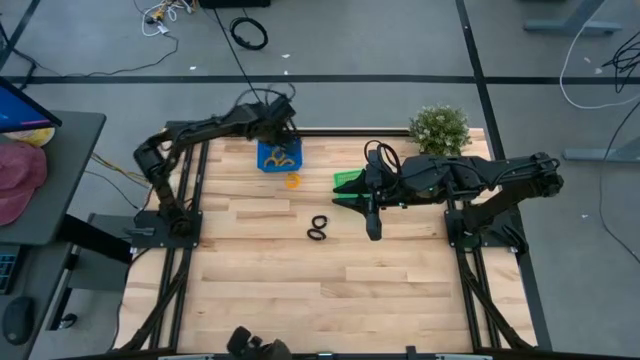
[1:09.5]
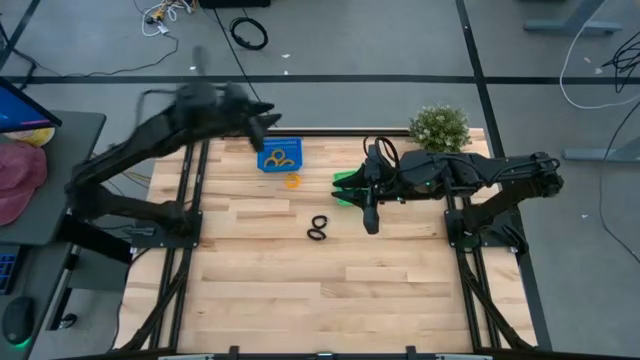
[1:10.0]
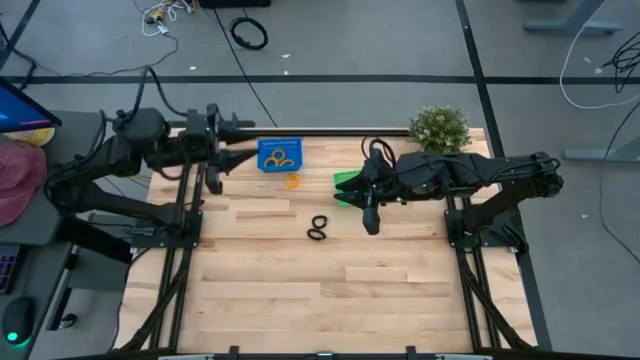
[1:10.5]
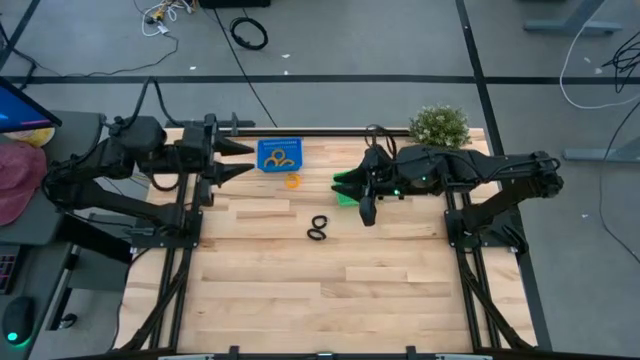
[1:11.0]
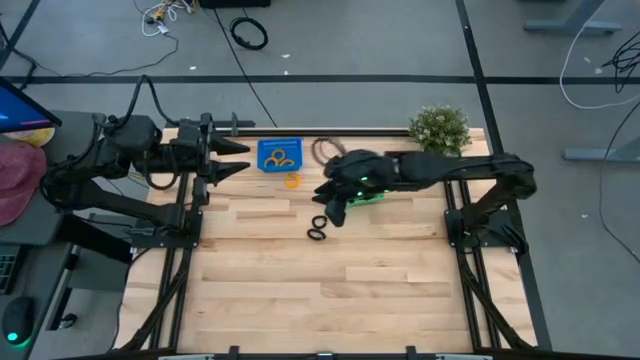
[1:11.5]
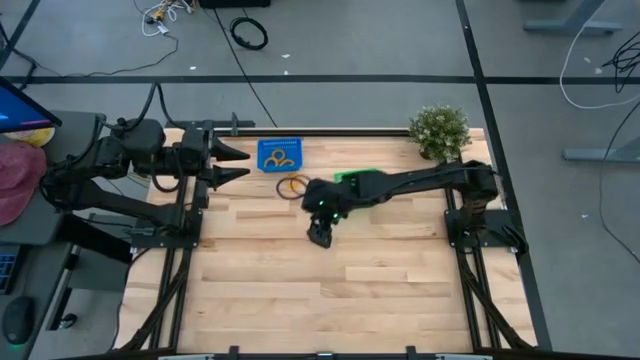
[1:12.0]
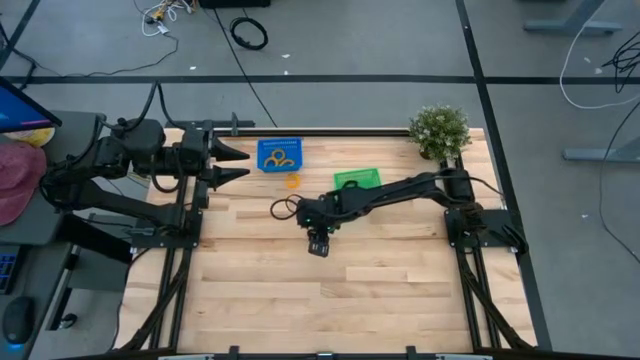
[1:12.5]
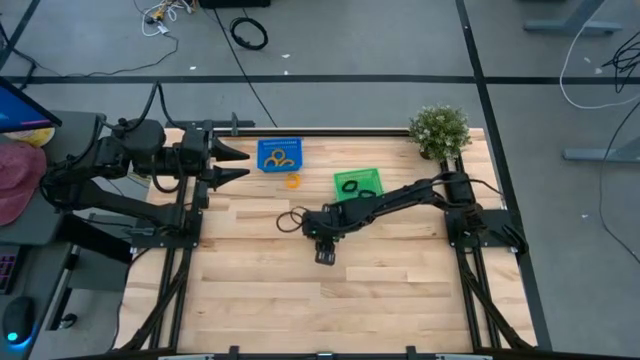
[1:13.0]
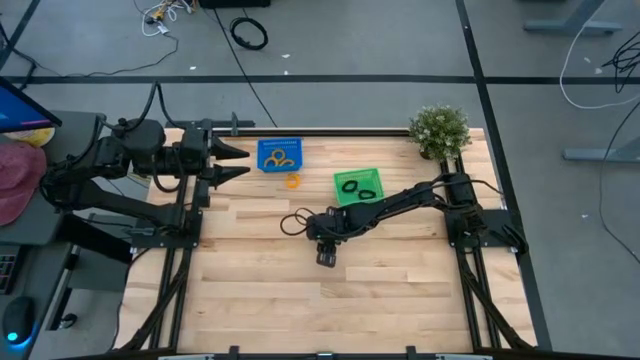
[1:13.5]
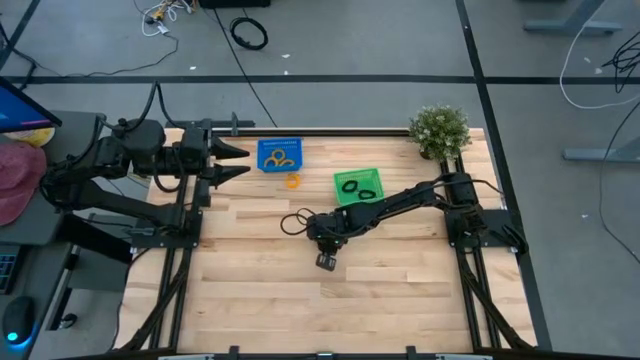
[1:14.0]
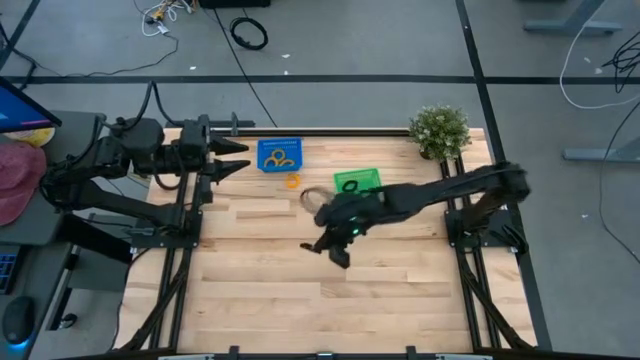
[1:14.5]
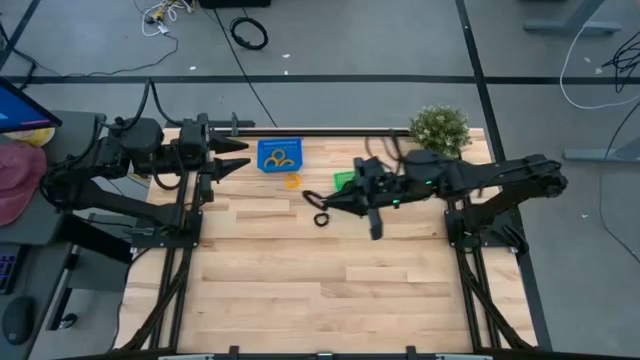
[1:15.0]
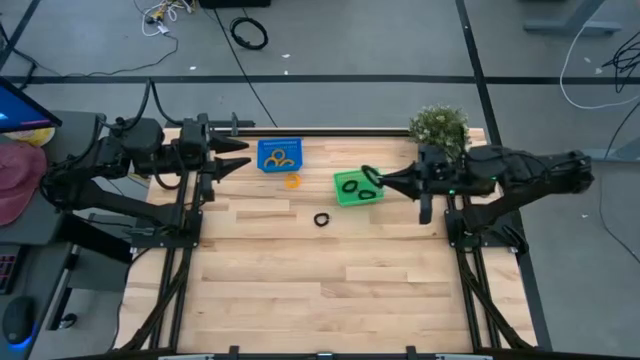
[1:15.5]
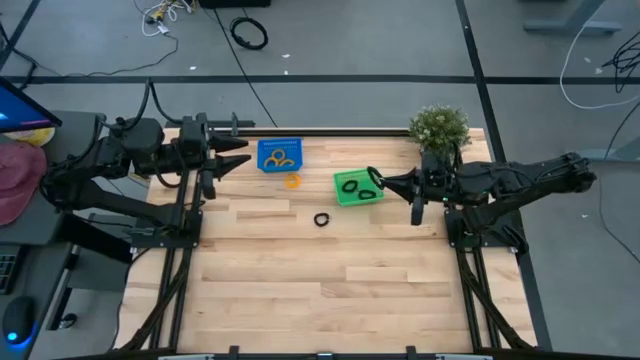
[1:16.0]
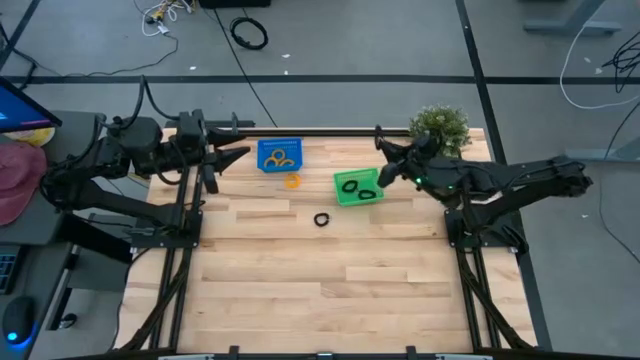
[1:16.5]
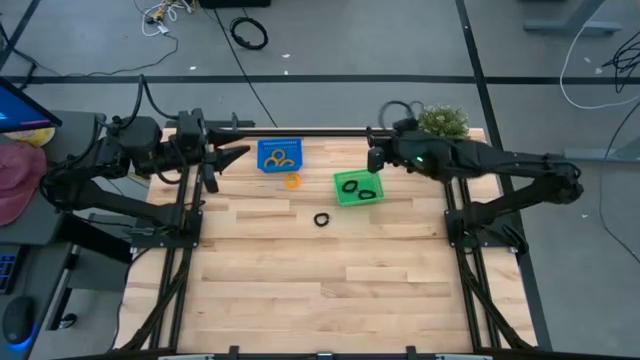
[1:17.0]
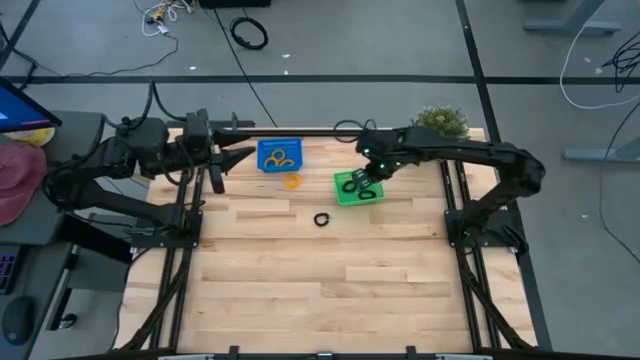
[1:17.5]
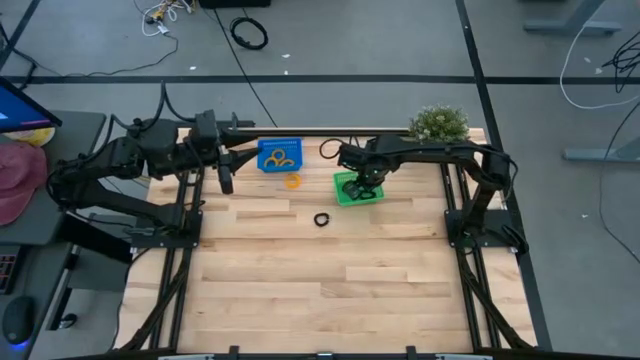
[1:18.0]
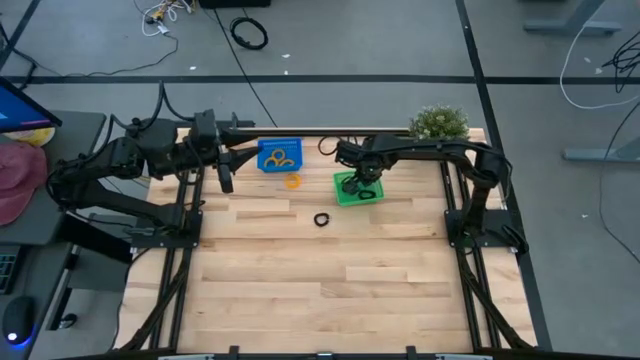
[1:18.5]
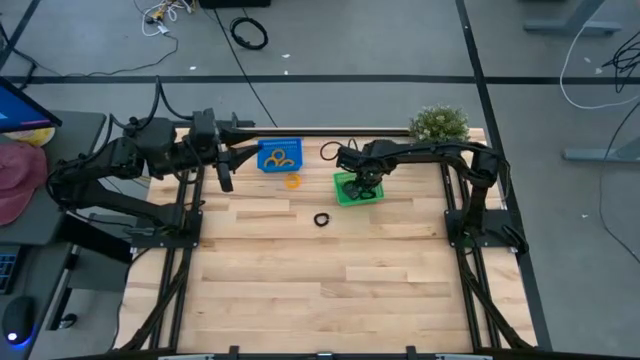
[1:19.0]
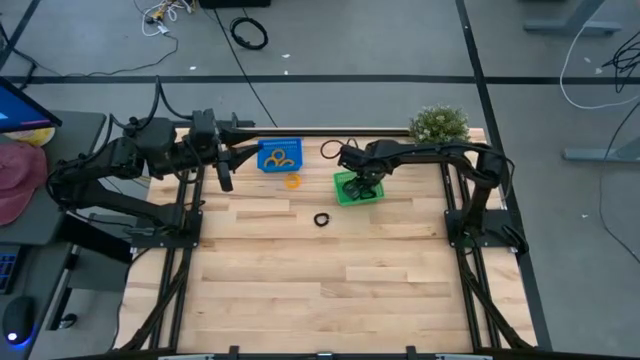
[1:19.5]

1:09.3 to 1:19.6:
Task: Sort spring keychains
Put the black spring keychain into the green bin

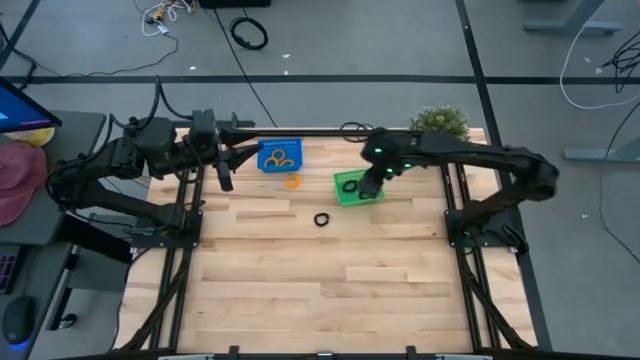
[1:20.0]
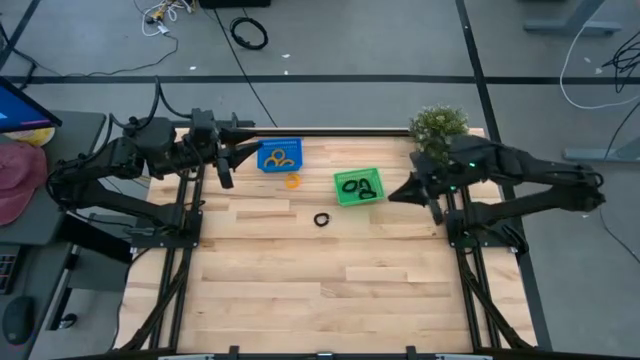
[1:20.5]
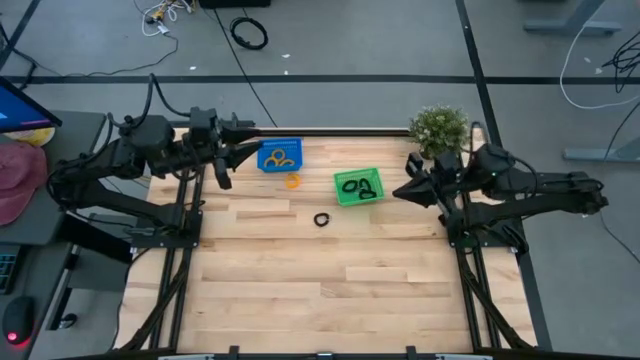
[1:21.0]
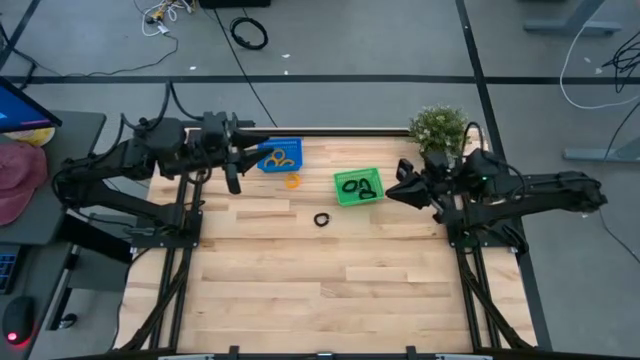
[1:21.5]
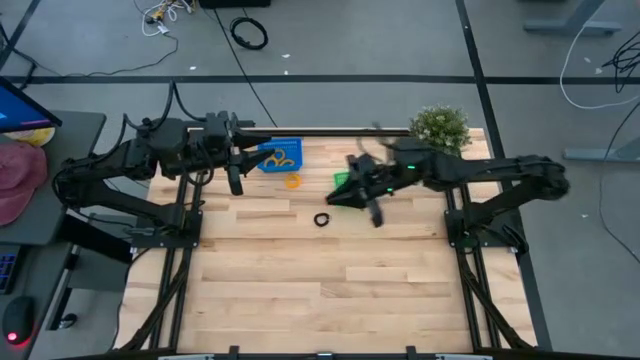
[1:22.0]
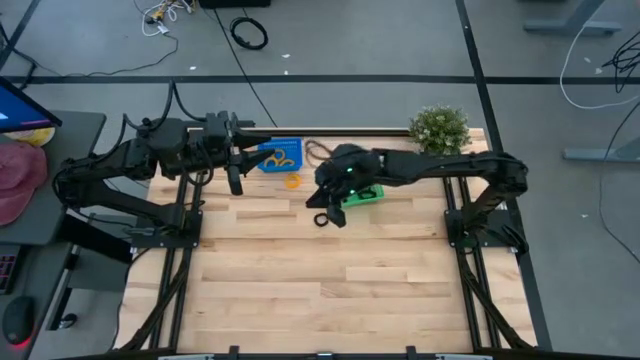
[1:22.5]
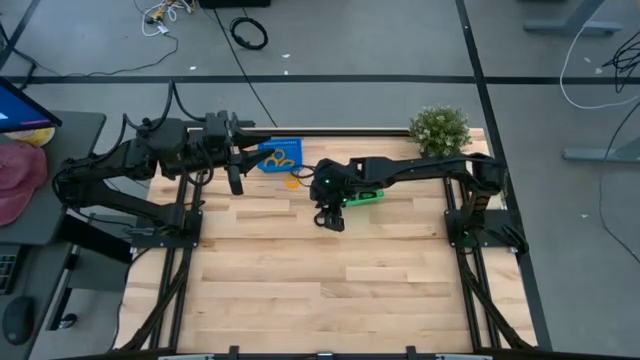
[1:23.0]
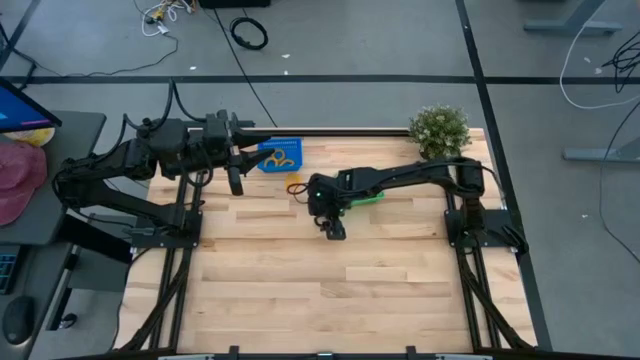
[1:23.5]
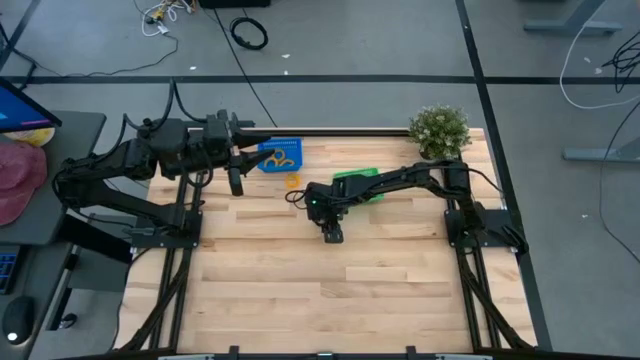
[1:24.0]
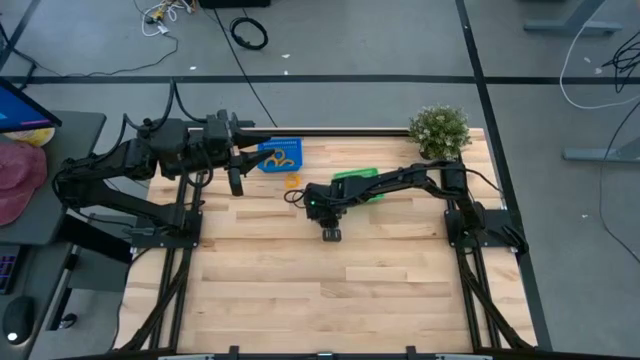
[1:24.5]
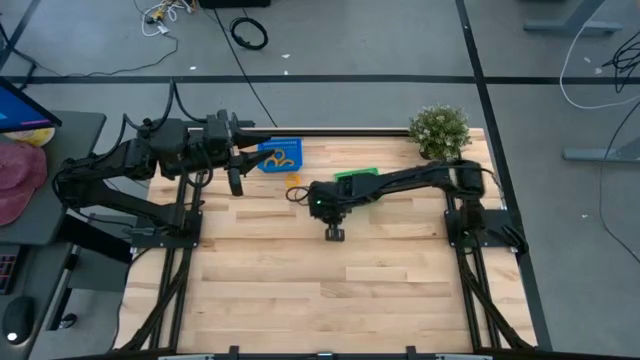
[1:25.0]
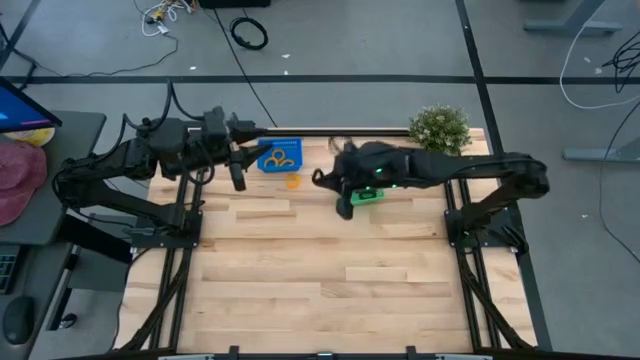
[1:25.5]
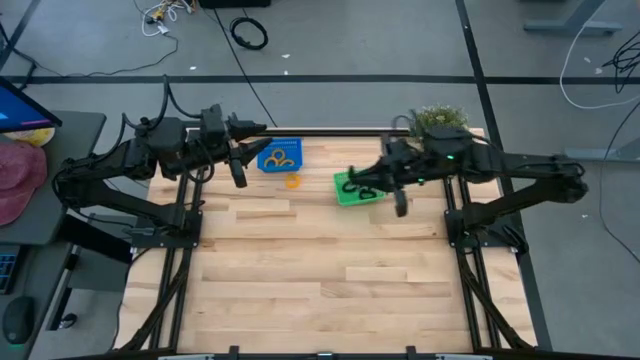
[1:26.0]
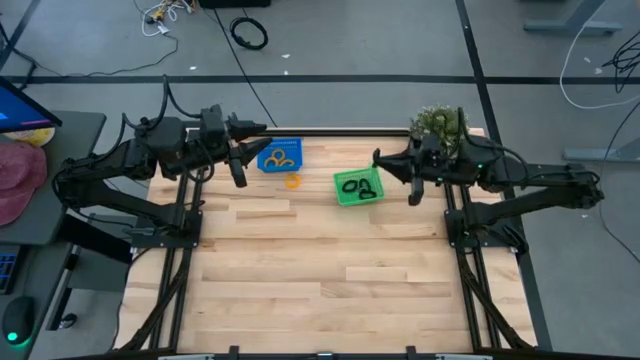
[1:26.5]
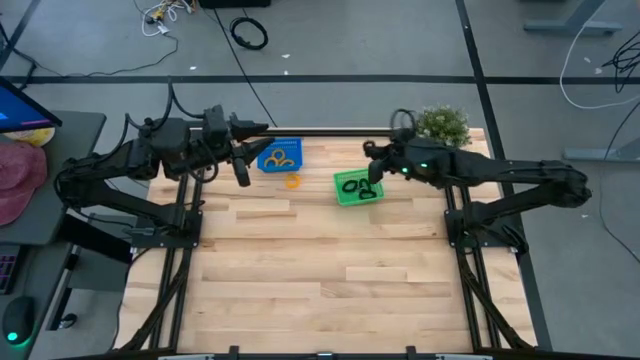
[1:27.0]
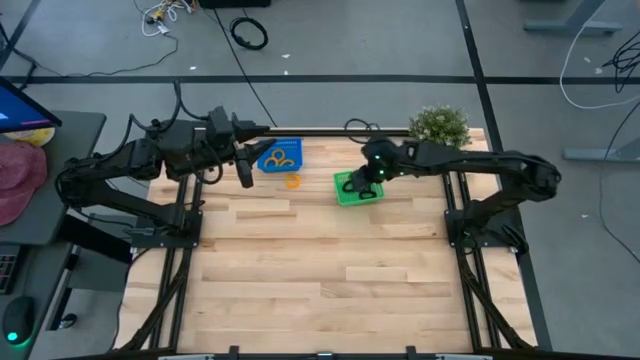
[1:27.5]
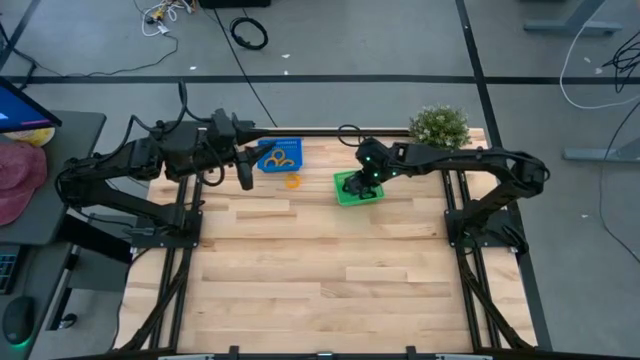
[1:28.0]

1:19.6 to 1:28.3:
Put the black spring keychain into the green bin

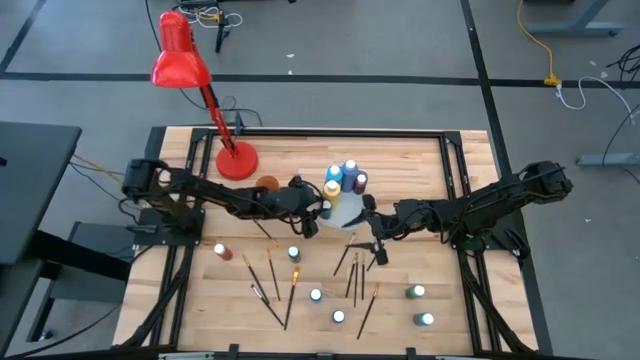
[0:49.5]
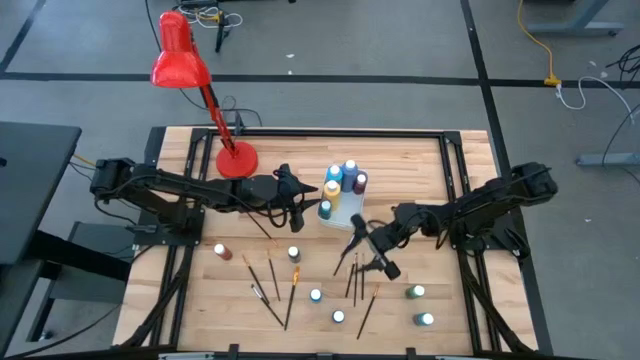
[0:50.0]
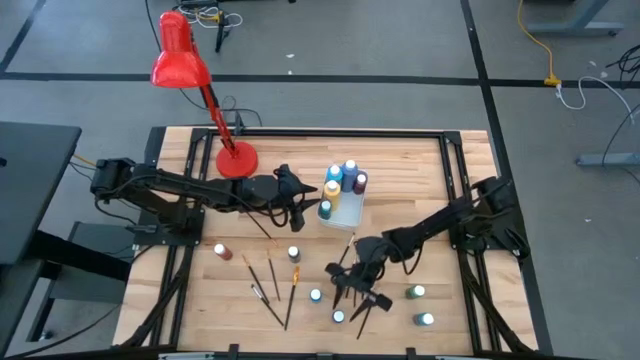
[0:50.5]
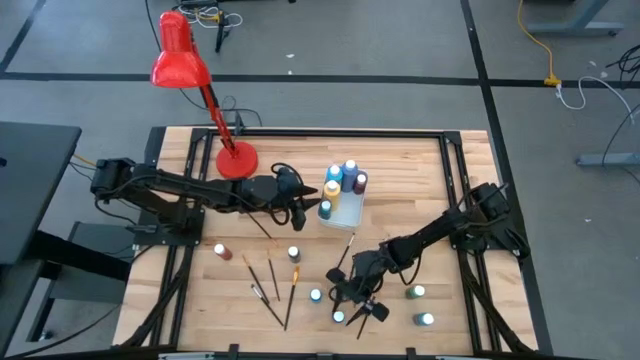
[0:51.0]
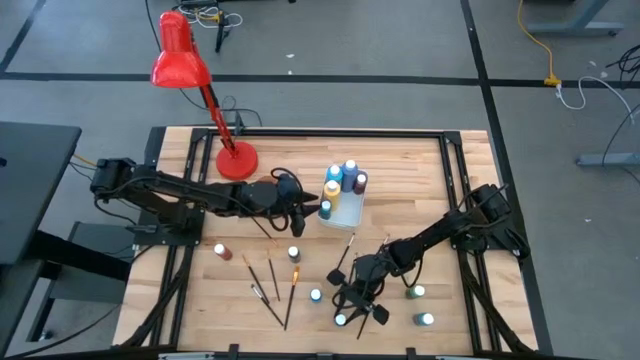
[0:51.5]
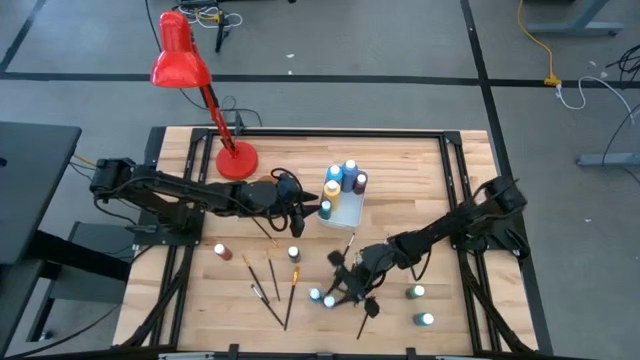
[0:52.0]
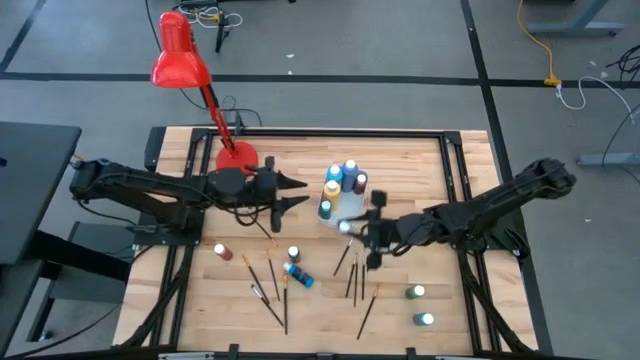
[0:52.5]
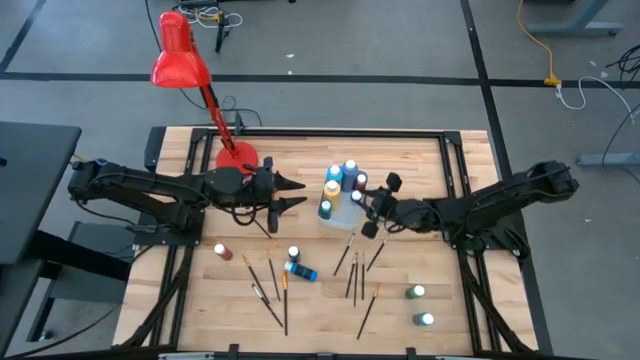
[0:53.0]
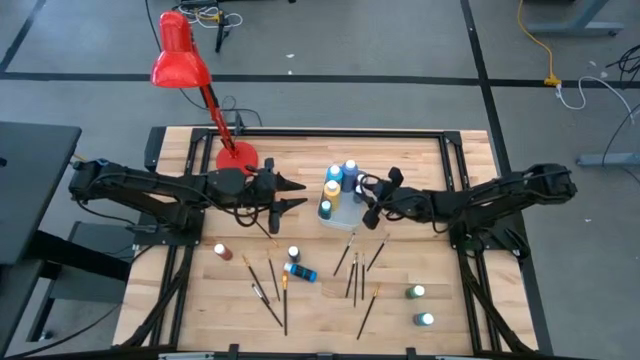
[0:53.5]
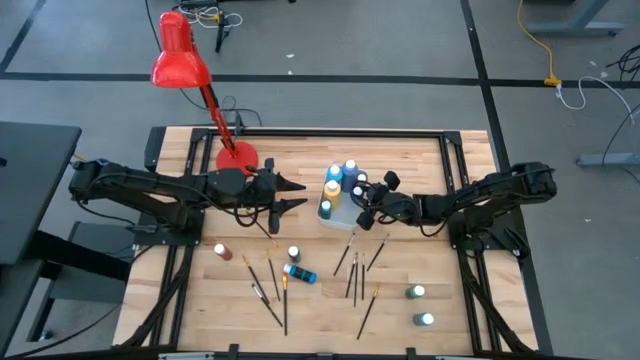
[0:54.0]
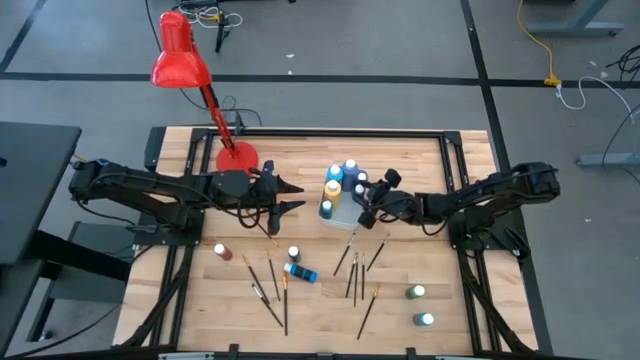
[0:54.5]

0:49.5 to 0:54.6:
Task: Pick & Place Paint Supplies
Put the small blue paint bottle into the white bin
